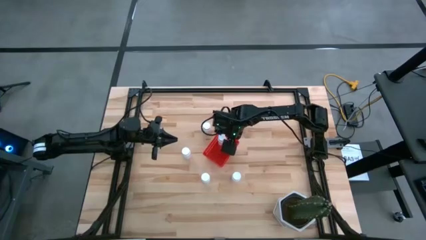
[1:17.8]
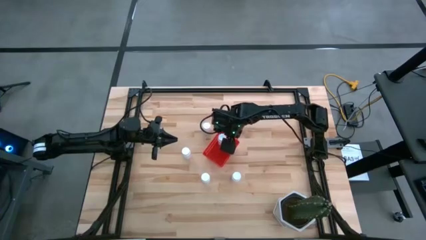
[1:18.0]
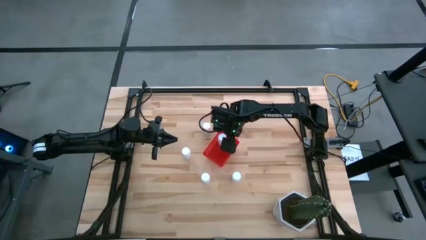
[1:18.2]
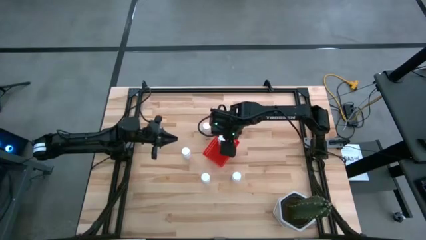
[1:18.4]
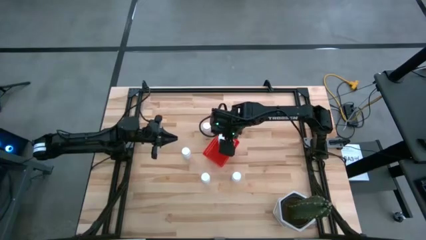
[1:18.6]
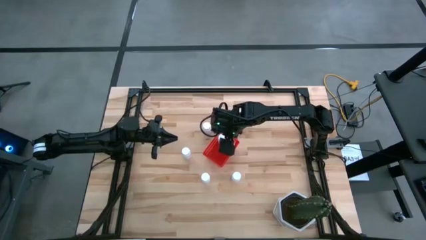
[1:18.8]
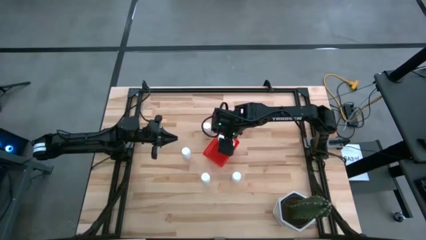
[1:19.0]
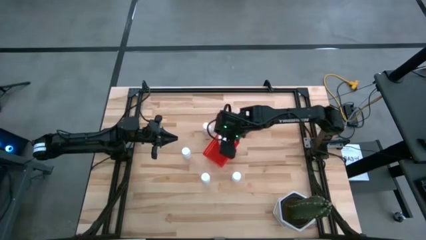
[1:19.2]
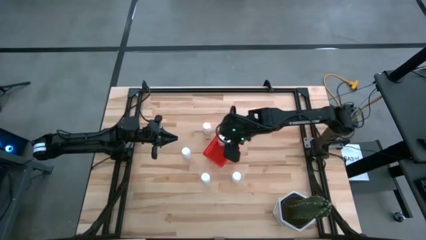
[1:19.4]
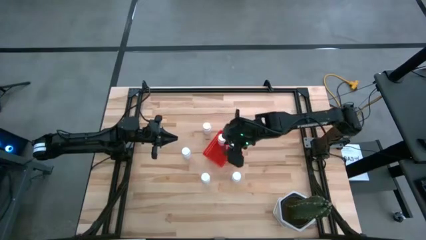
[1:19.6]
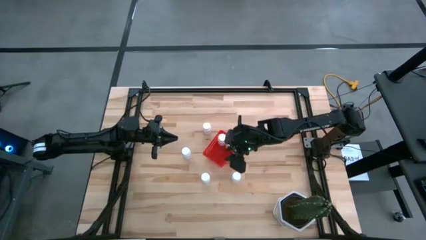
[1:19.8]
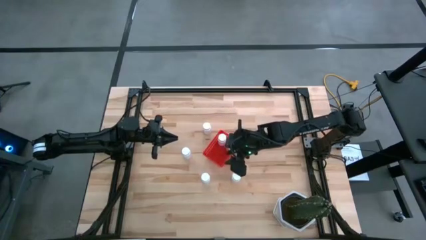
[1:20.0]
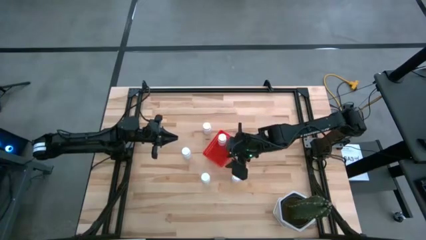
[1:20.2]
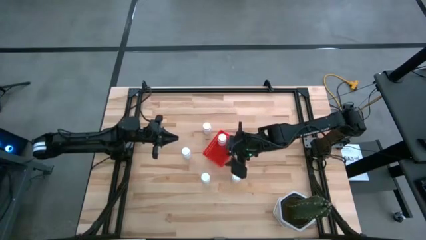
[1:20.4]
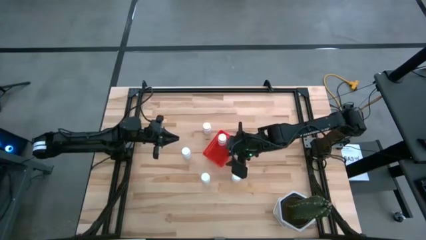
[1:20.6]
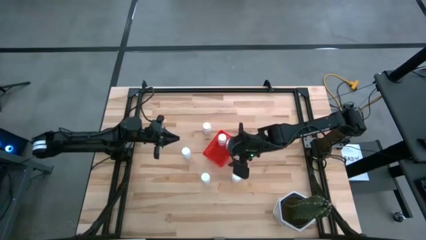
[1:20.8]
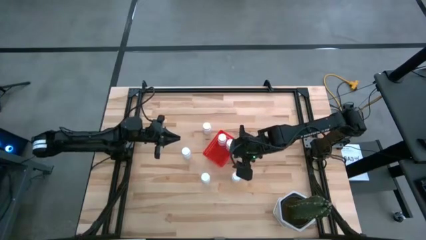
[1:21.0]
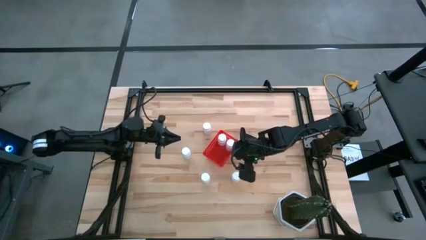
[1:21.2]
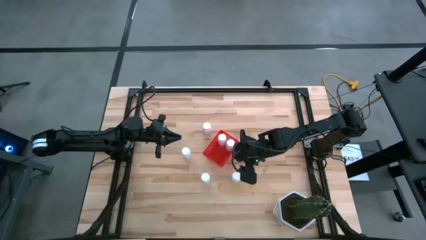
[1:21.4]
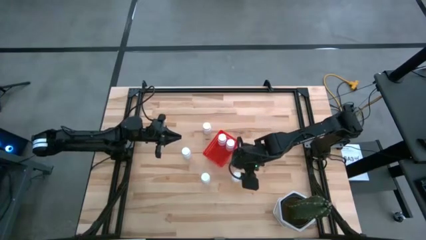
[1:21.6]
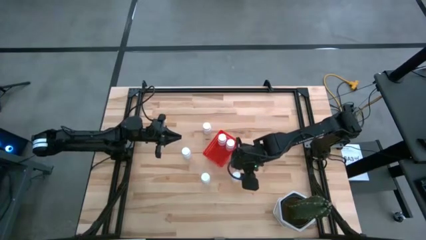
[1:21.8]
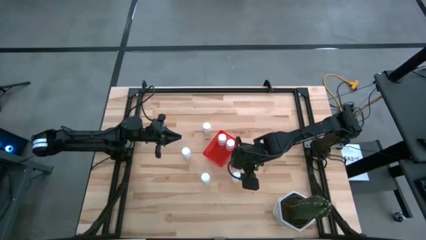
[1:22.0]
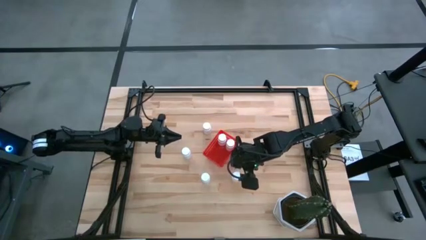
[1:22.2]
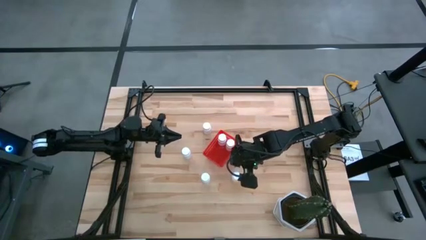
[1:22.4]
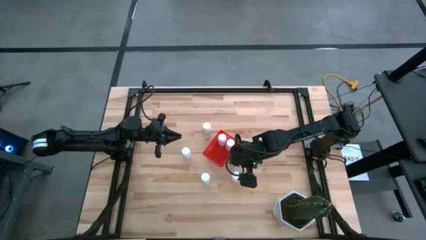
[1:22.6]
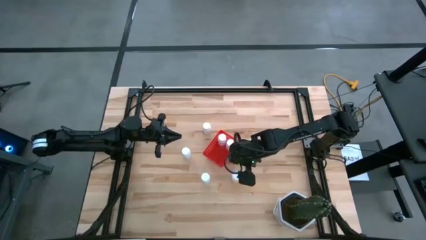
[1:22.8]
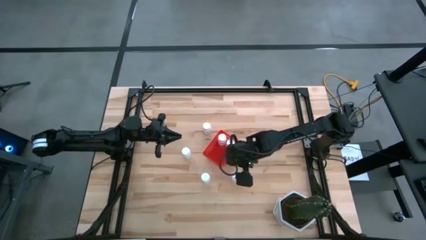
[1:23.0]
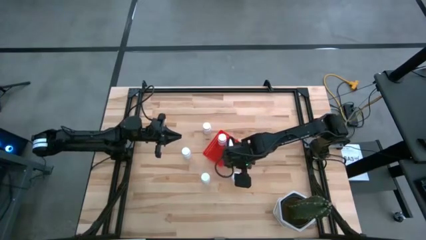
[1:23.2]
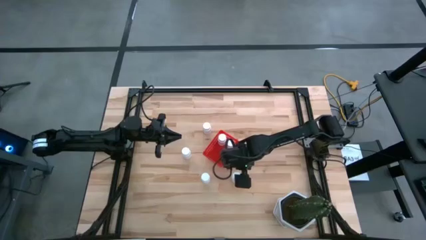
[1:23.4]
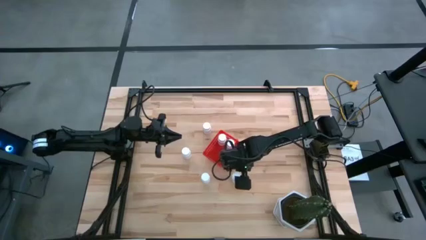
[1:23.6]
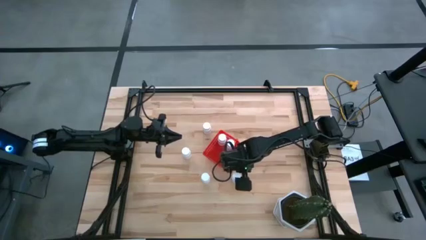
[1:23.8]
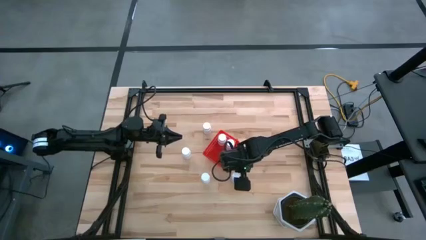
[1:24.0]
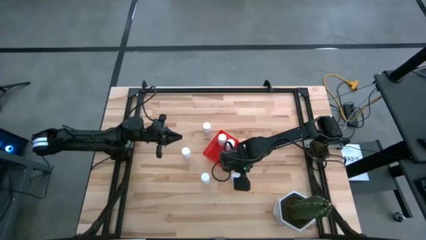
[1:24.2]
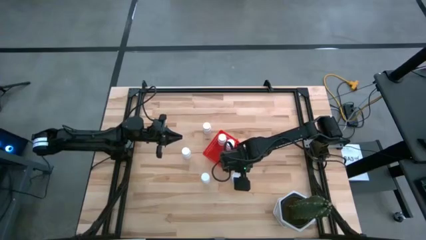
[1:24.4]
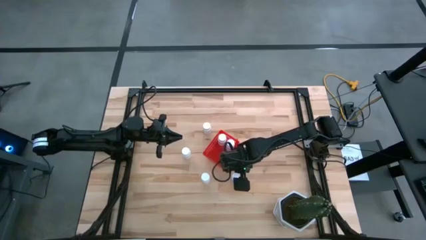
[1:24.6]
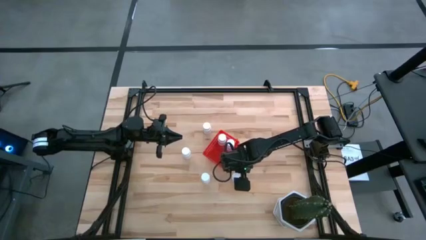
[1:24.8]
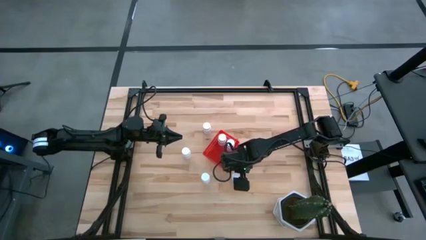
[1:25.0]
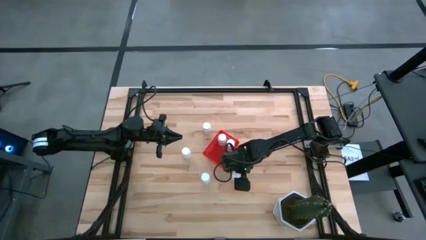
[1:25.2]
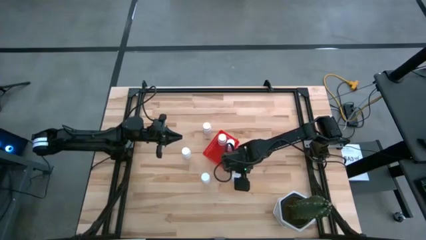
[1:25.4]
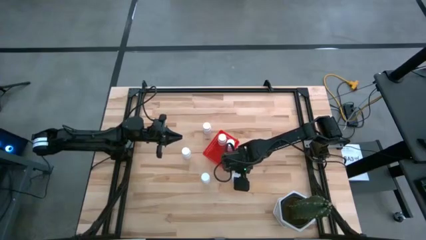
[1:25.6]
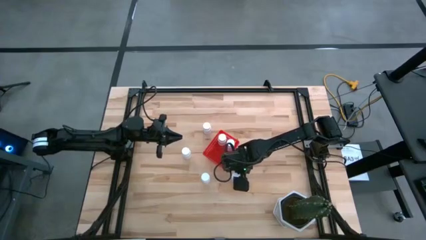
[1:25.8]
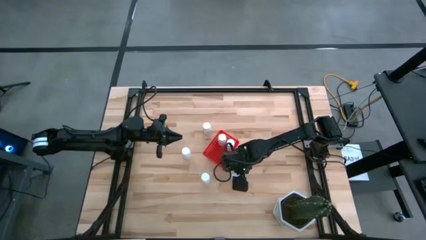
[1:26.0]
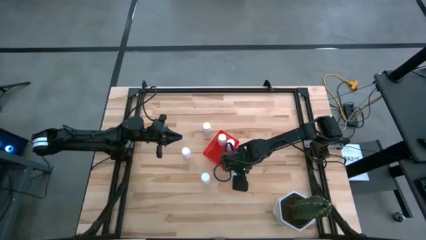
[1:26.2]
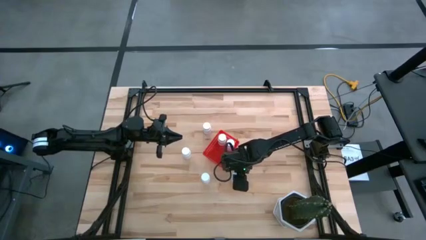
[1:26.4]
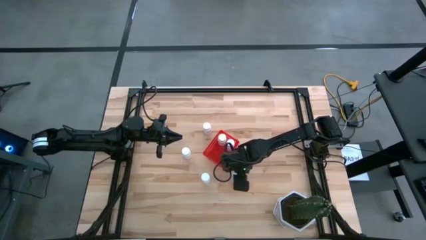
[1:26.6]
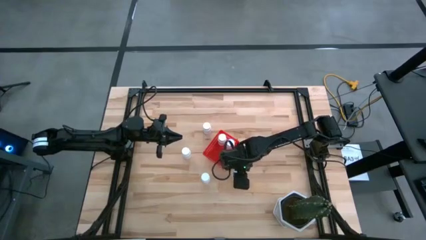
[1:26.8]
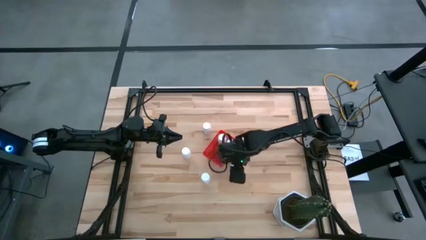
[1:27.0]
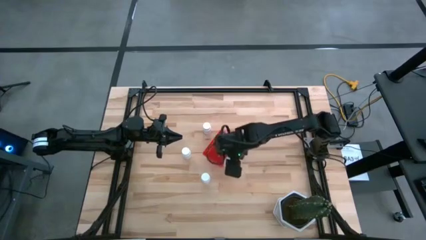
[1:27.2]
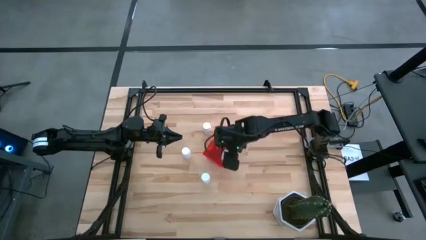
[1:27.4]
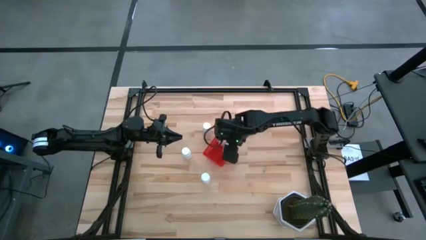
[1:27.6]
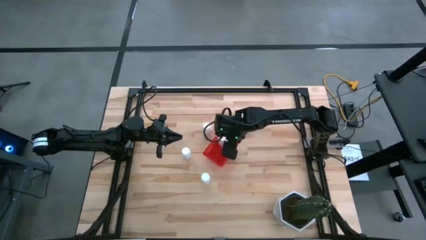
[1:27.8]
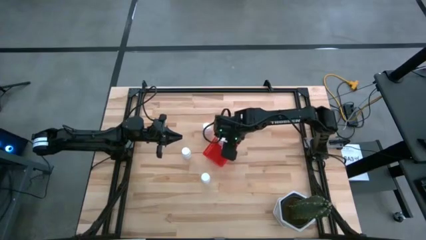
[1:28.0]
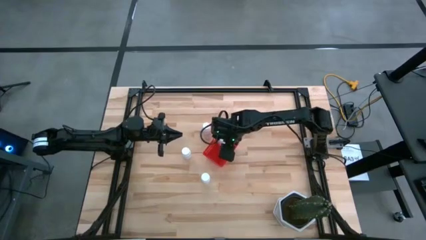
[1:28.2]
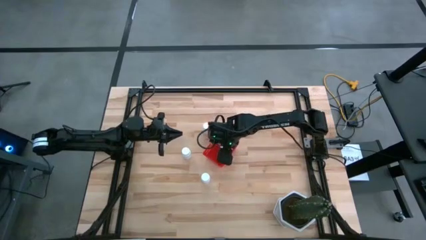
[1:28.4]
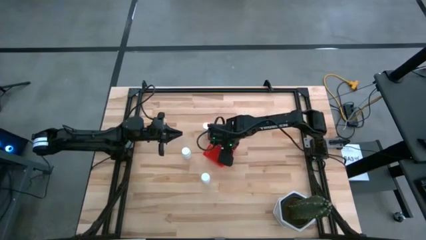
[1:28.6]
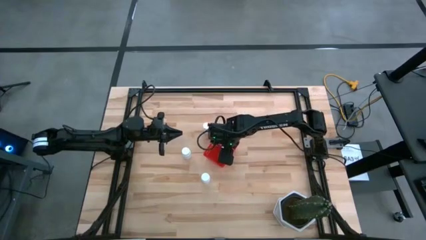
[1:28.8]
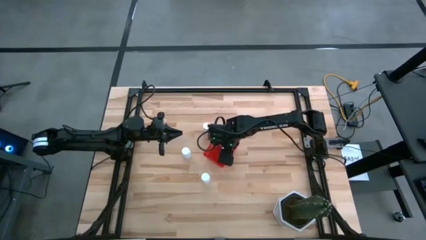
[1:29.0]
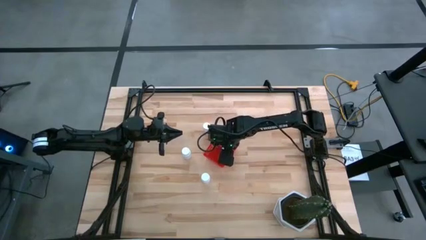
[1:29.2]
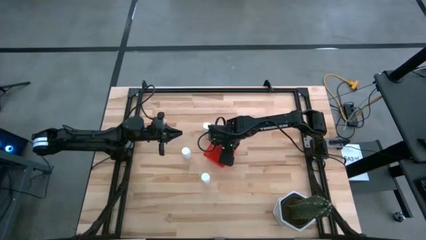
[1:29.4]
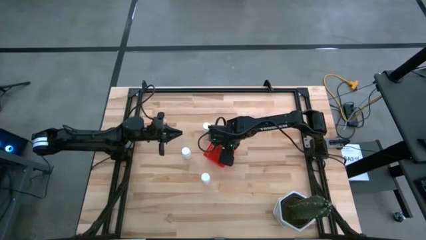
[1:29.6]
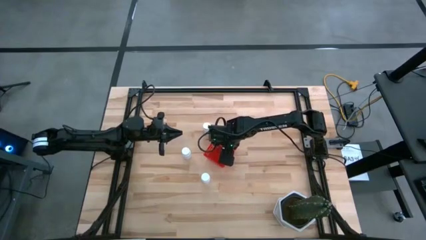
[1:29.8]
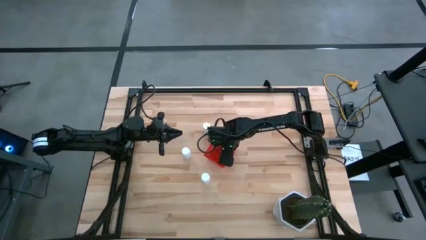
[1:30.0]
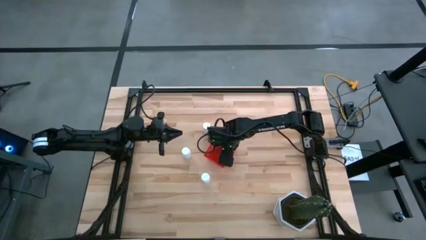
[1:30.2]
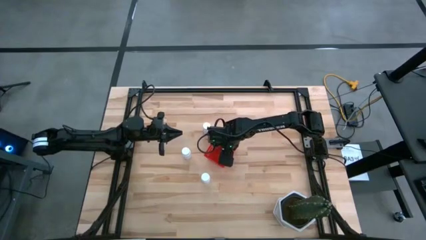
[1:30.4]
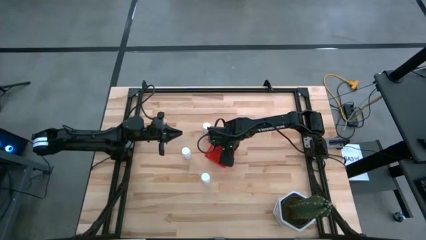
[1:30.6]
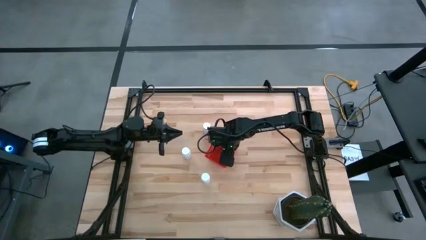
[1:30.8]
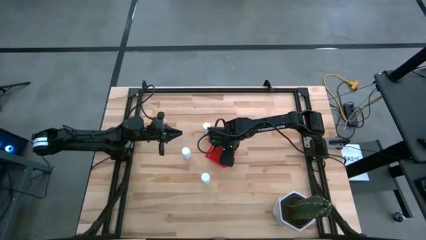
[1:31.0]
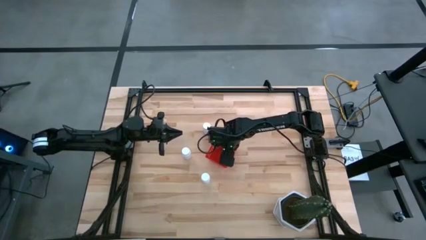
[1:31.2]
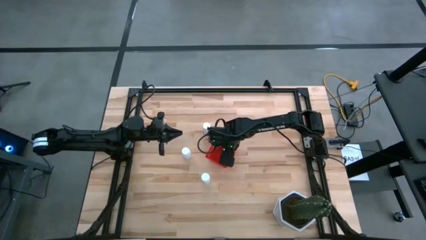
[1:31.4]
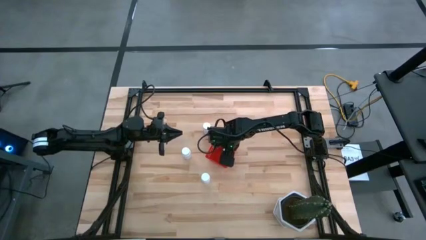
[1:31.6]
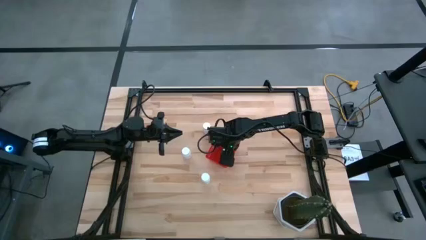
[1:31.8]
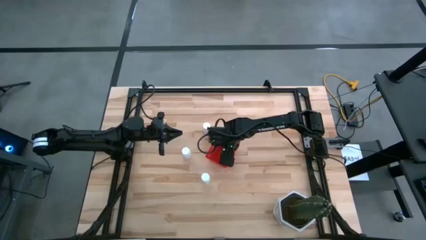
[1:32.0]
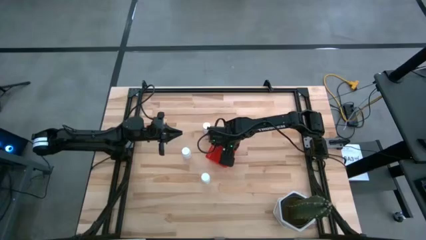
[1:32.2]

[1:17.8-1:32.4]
Task: Pick and place pill bottles into a basket
Put the white pill bottle into the red basket

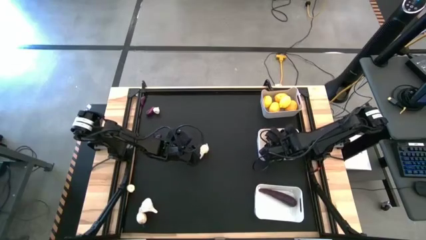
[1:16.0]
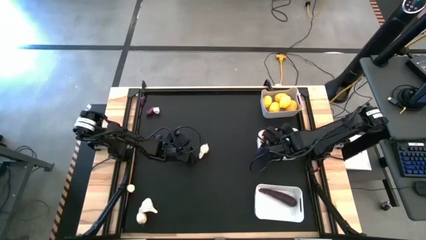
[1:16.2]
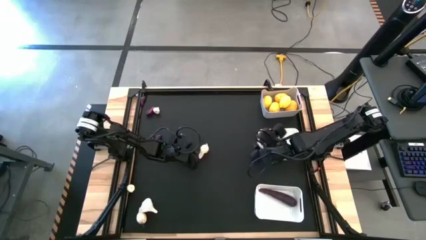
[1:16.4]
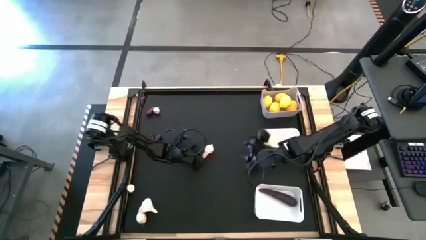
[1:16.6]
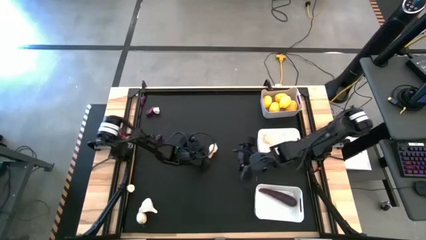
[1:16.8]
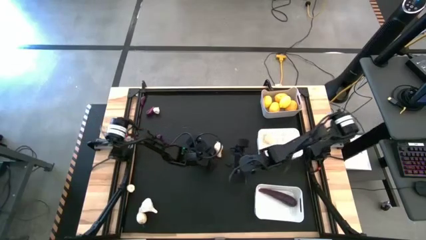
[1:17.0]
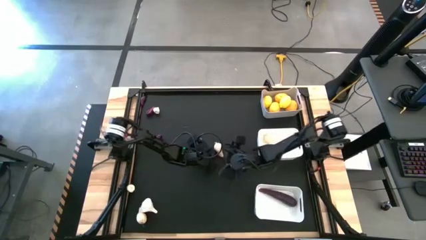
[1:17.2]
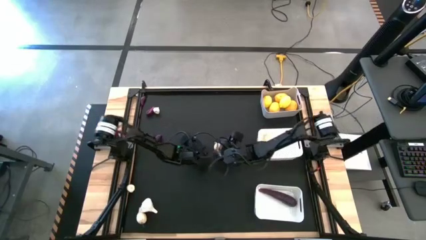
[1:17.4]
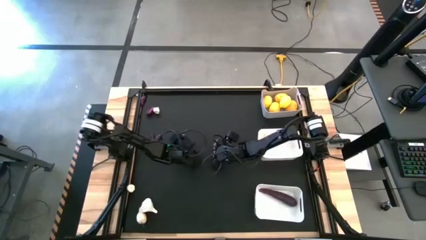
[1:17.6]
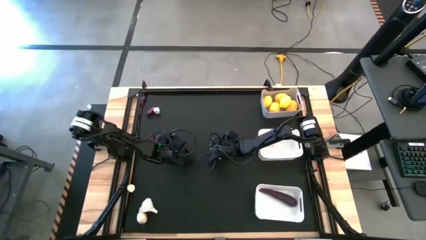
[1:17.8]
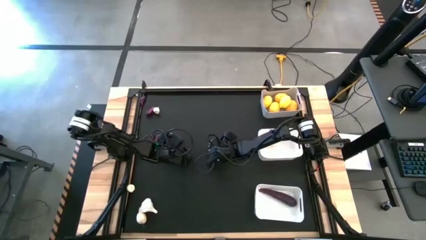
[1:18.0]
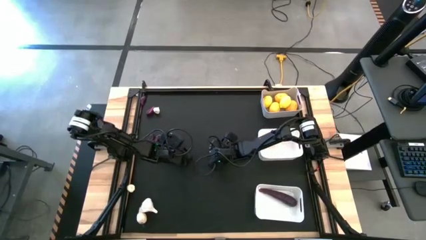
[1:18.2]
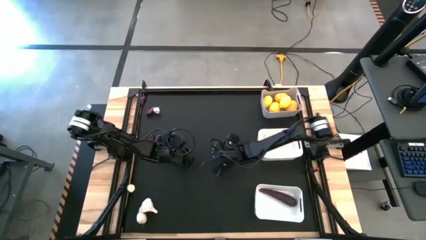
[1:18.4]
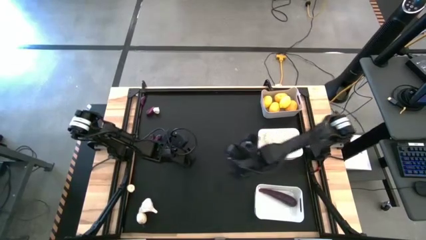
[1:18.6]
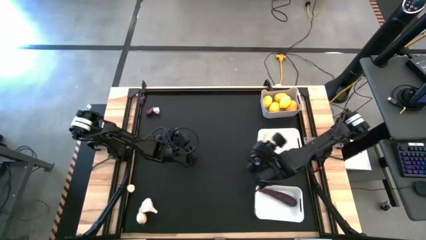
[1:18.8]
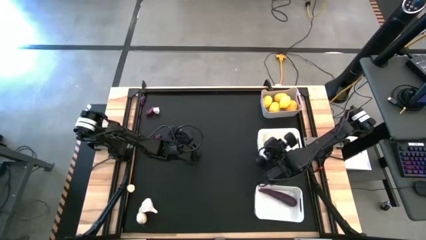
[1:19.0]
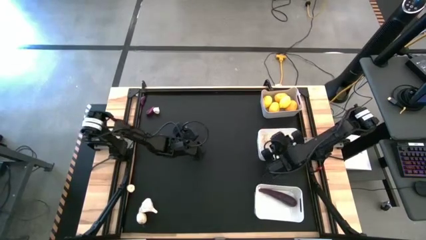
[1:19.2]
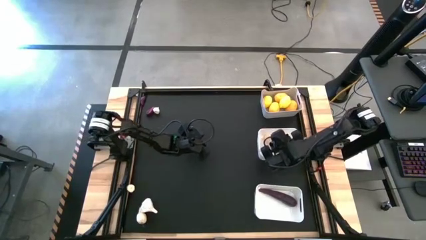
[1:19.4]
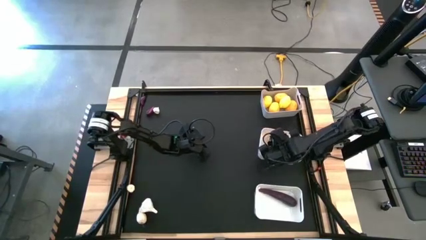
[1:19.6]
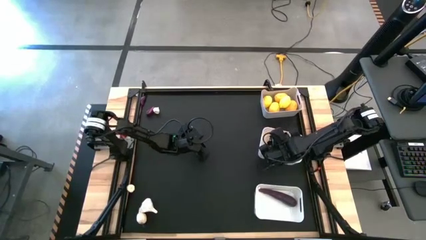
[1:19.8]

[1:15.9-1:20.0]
Task: Sort produce into baskets
Put the garlic into the top white bin
